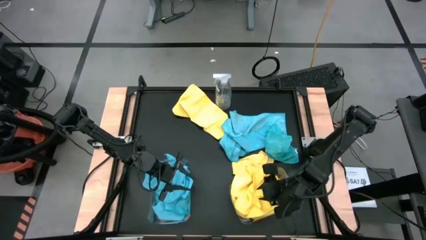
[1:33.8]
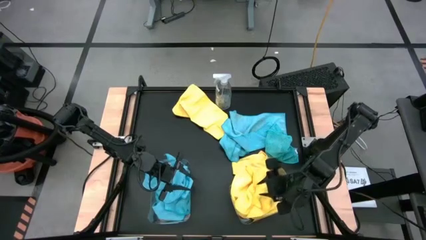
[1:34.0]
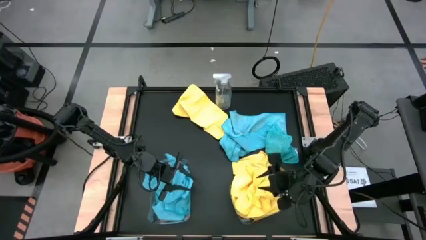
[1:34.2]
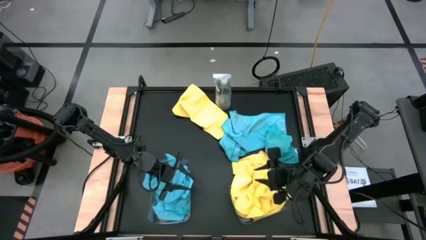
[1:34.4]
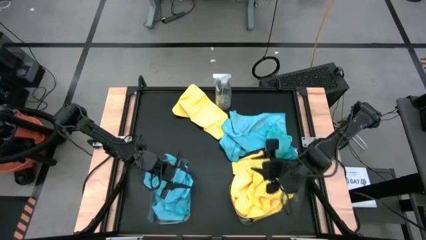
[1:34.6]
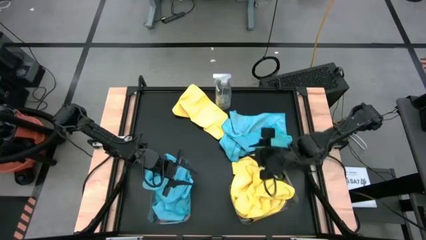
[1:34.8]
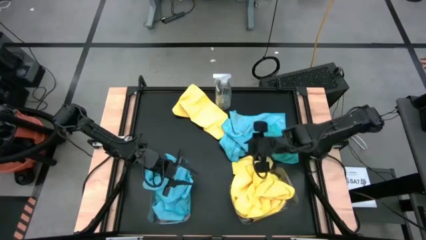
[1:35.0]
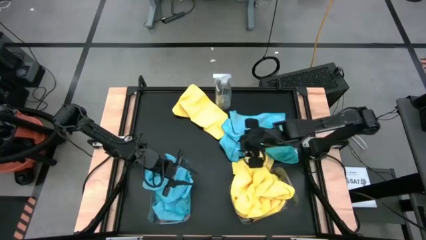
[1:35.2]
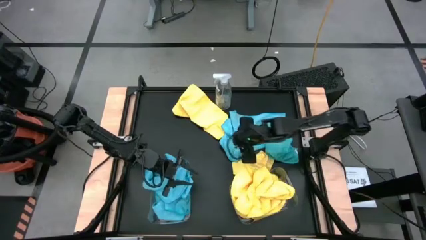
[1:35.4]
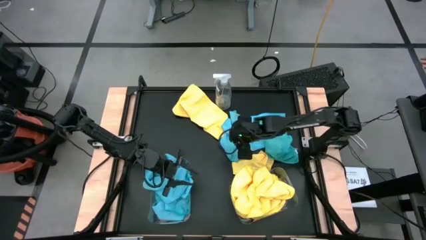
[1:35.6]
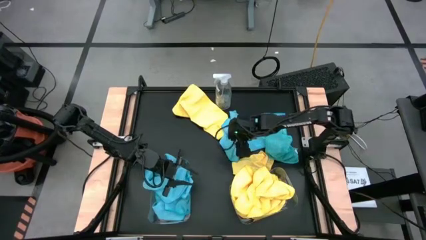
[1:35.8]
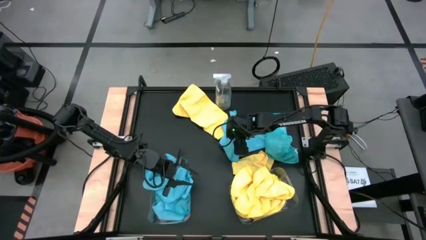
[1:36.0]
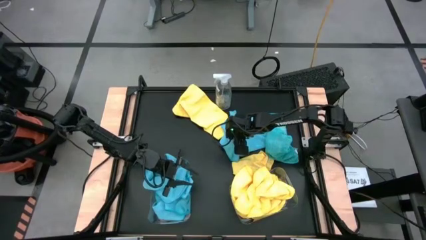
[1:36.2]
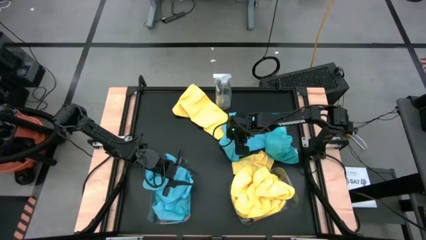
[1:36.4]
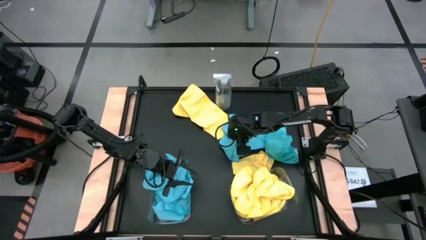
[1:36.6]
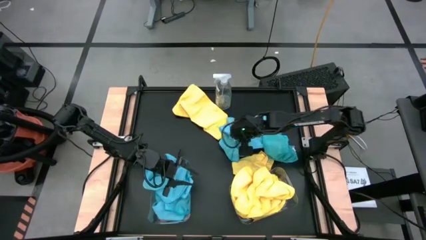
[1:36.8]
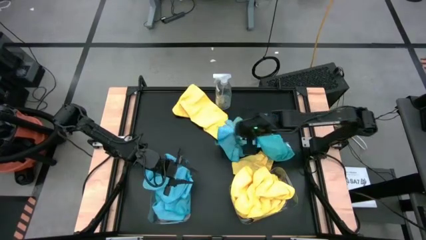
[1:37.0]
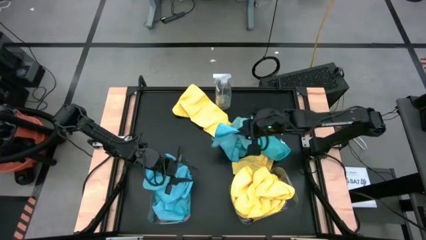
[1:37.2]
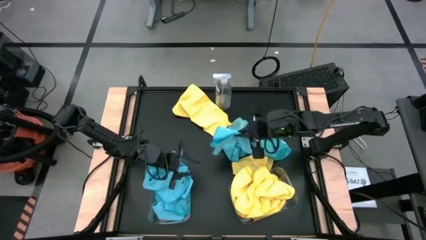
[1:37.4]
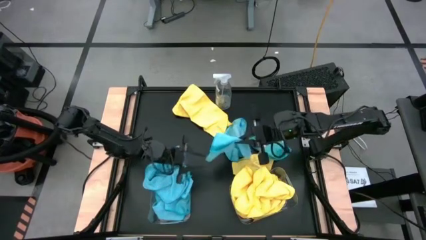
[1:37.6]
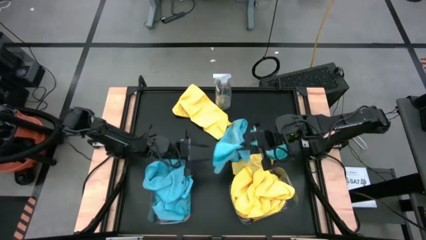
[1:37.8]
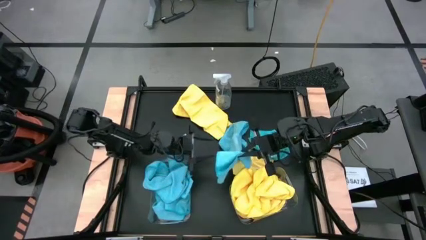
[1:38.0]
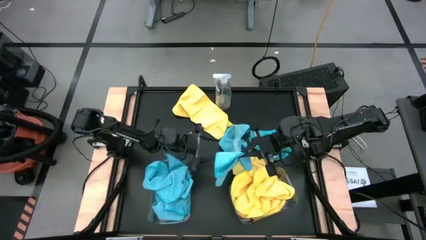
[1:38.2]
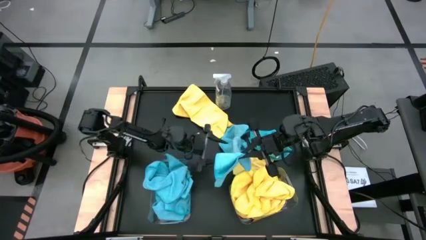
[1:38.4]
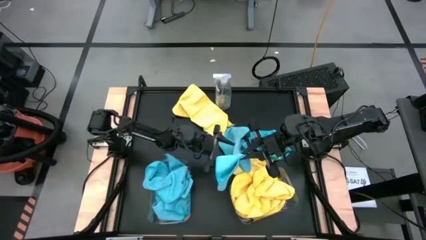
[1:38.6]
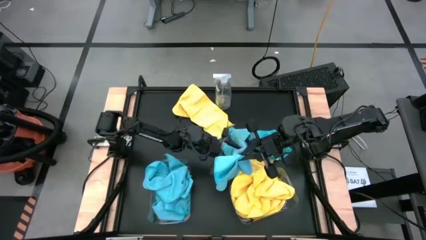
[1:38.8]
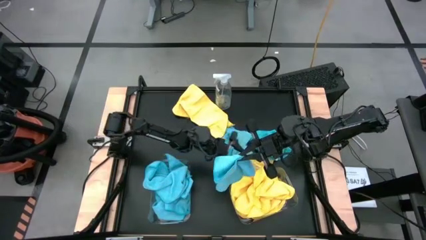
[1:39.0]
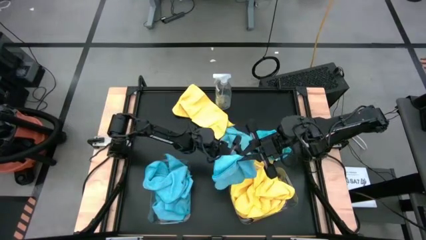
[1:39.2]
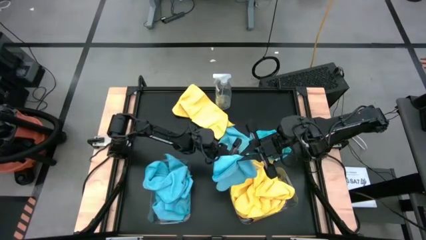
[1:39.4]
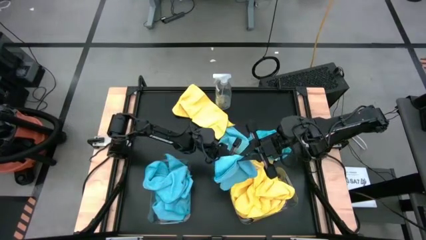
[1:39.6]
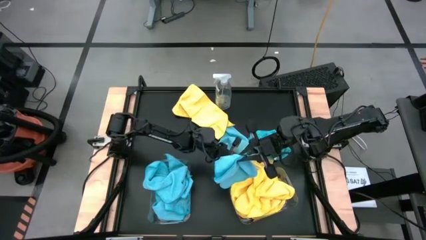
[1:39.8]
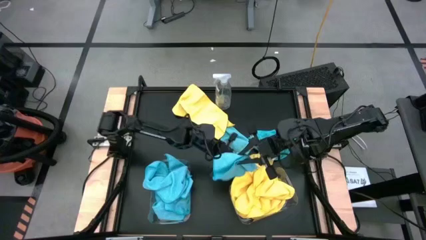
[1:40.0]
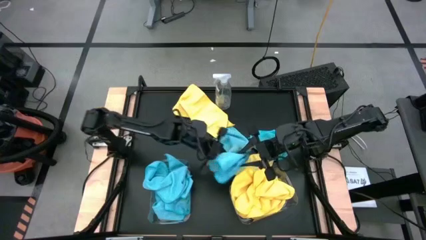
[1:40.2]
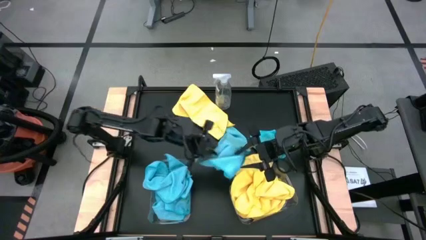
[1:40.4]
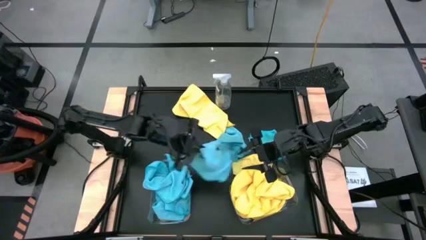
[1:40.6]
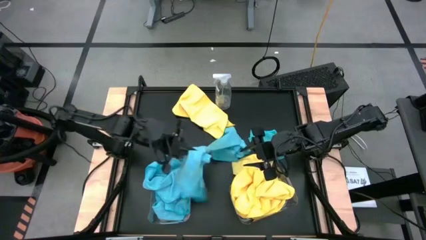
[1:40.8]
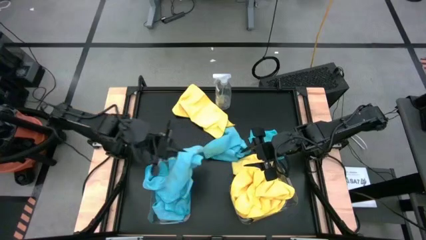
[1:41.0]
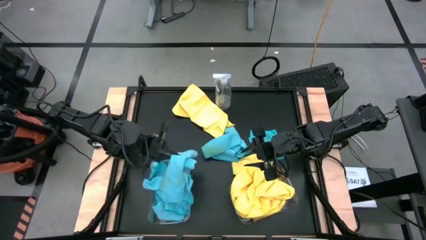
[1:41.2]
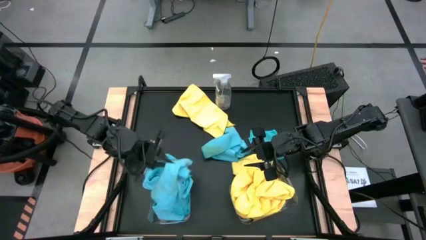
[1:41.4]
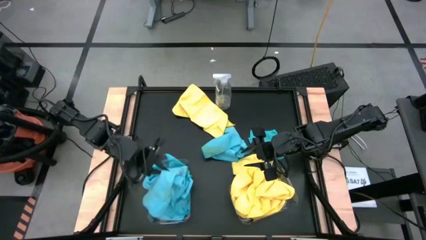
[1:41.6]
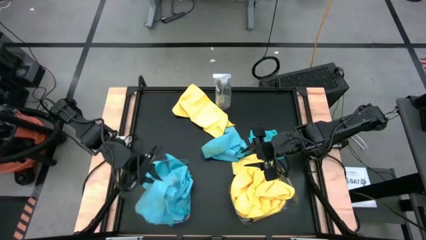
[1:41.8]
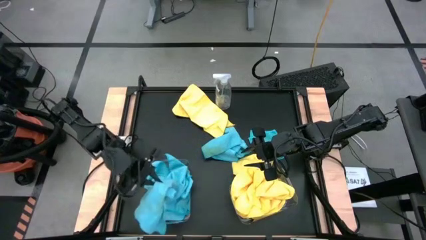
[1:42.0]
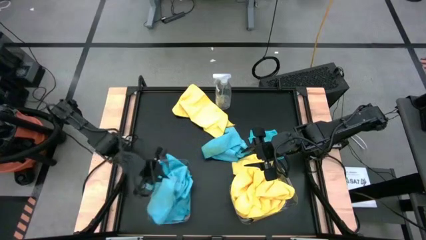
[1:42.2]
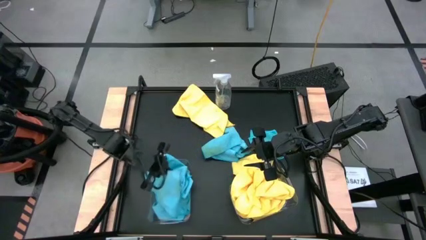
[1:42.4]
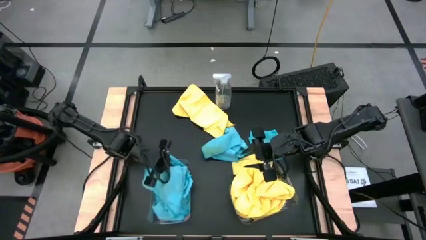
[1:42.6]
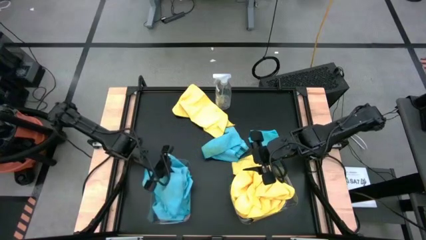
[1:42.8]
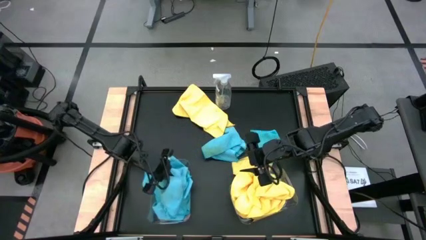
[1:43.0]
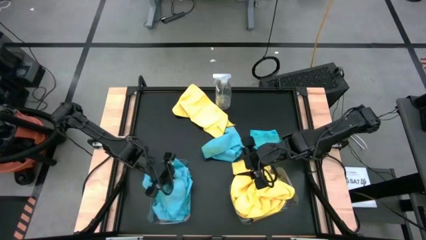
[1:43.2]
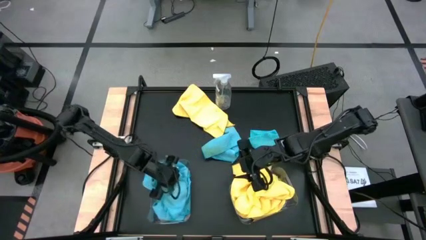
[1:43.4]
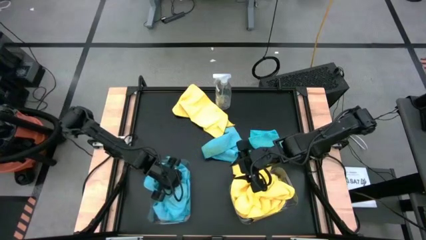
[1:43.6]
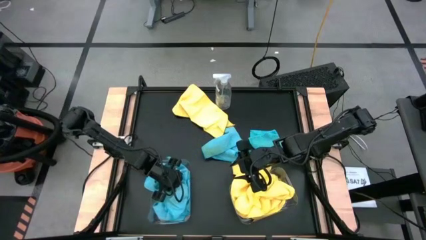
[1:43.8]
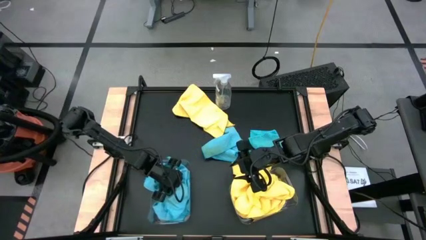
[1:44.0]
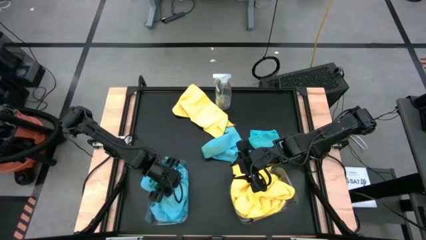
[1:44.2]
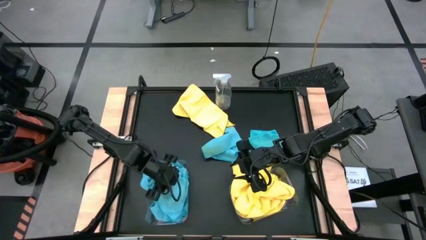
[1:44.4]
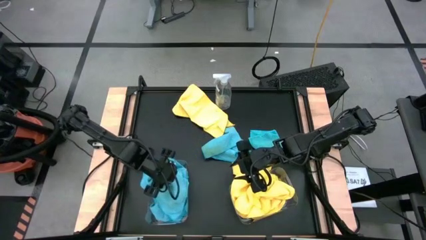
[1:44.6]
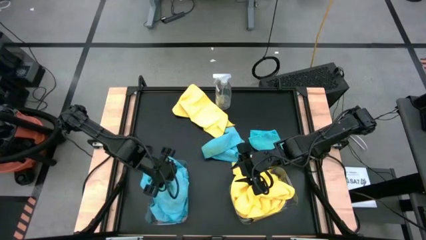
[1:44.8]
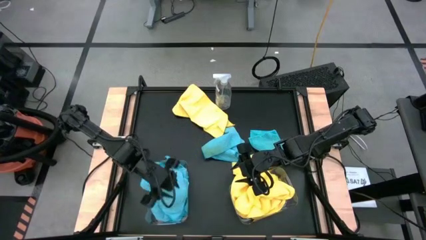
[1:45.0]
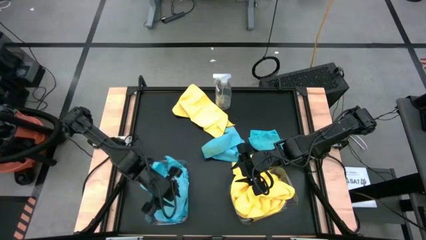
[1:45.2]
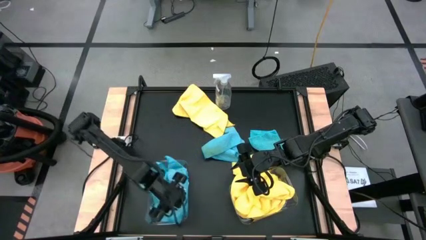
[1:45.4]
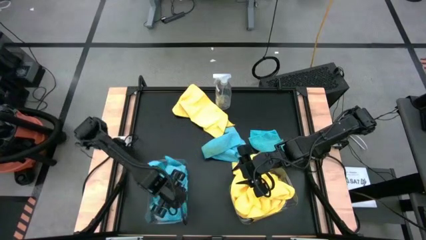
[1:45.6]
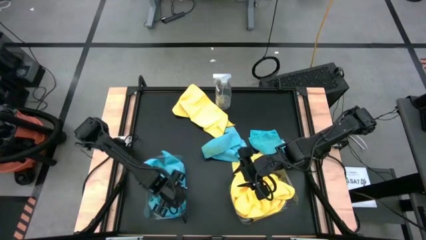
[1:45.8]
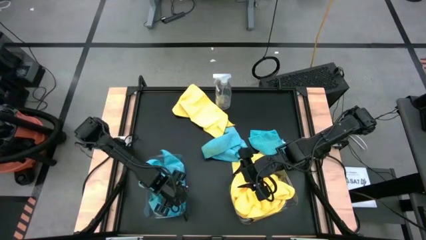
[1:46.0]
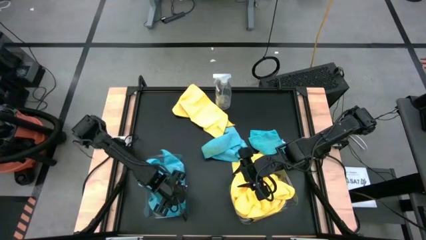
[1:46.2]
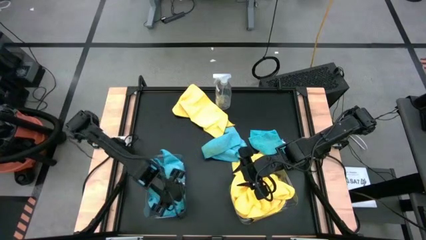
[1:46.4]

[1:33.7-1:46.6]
Task: Sort microfiber towel by color & place in baskets
Put the blue microfiber towel into the left transparent bin

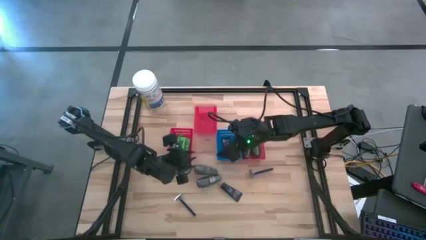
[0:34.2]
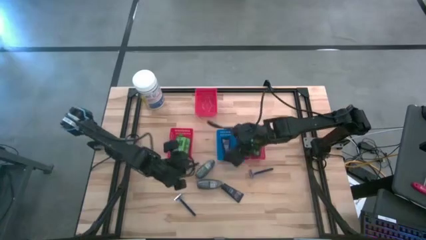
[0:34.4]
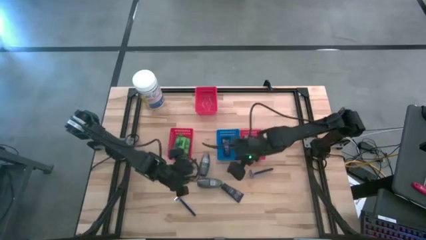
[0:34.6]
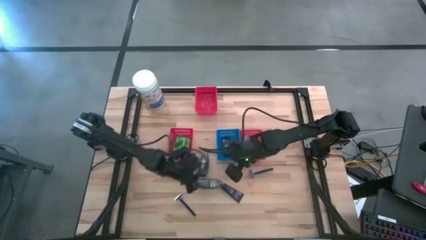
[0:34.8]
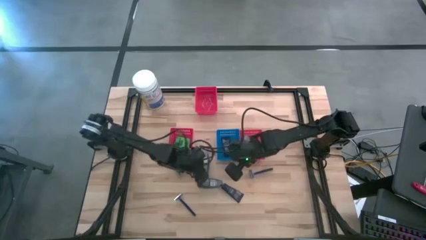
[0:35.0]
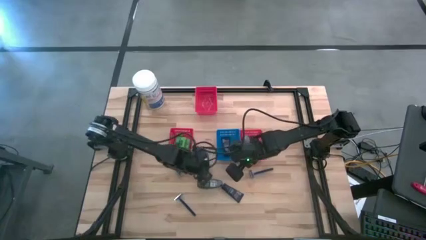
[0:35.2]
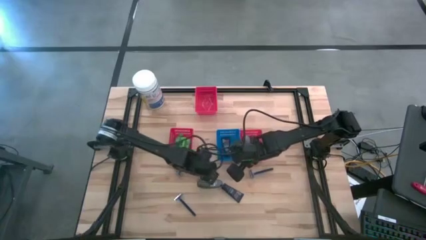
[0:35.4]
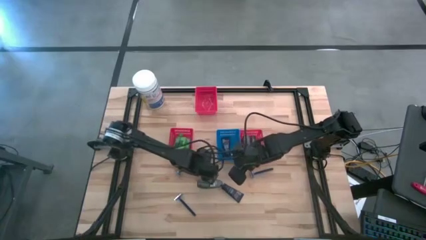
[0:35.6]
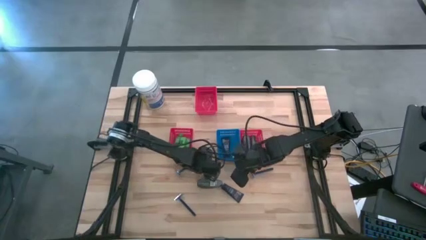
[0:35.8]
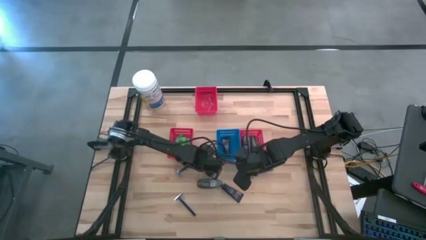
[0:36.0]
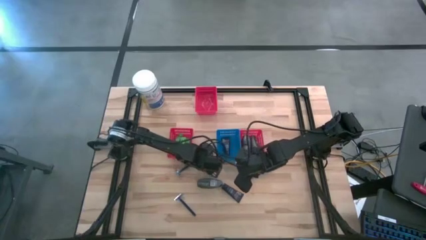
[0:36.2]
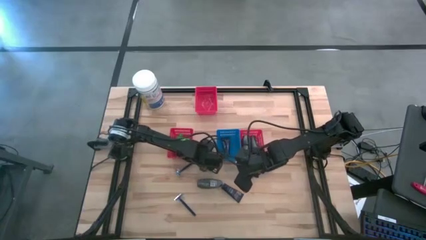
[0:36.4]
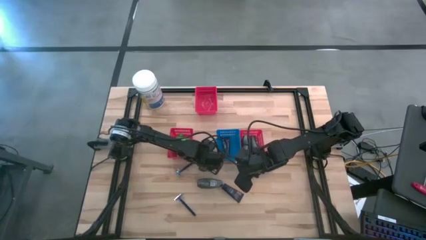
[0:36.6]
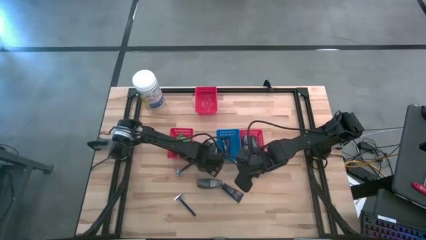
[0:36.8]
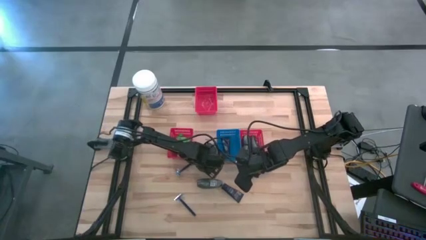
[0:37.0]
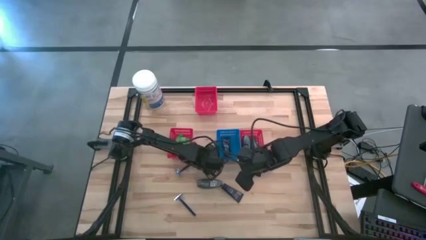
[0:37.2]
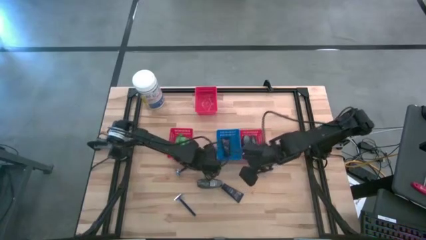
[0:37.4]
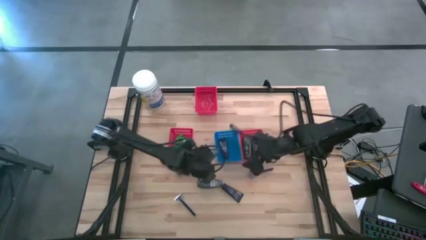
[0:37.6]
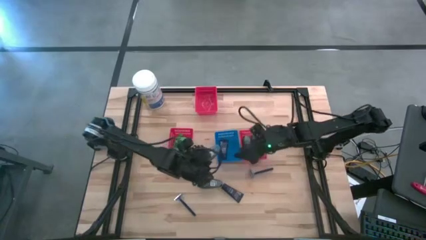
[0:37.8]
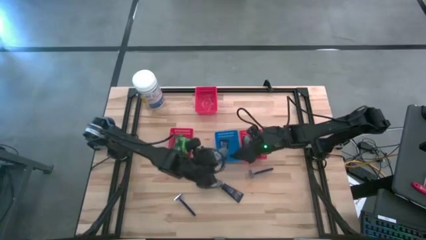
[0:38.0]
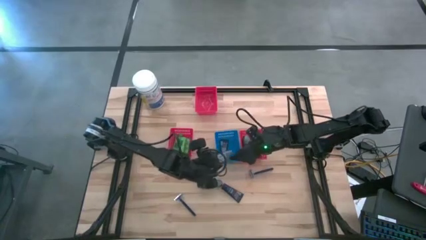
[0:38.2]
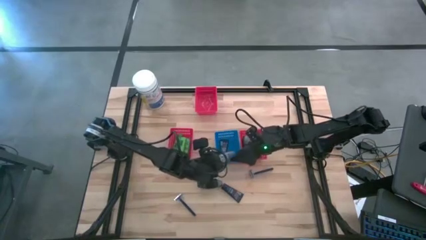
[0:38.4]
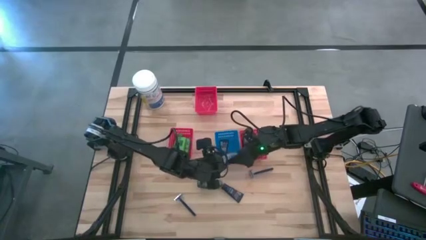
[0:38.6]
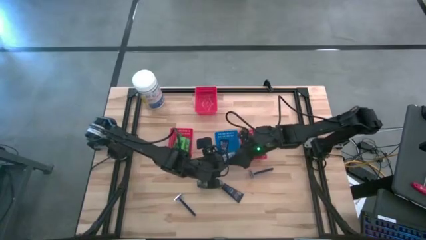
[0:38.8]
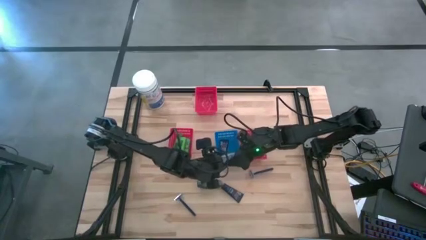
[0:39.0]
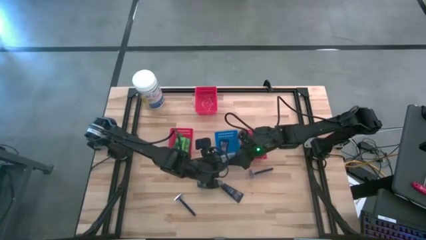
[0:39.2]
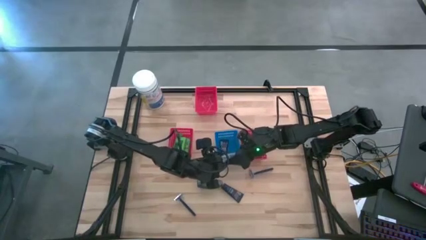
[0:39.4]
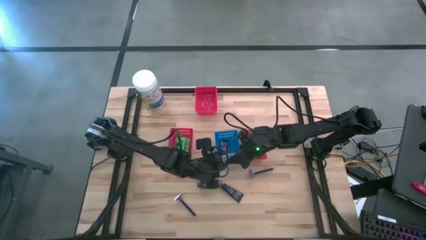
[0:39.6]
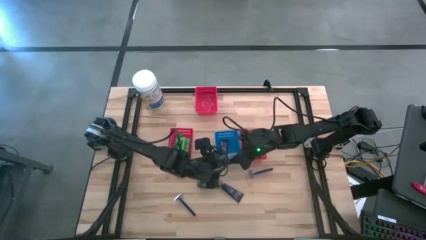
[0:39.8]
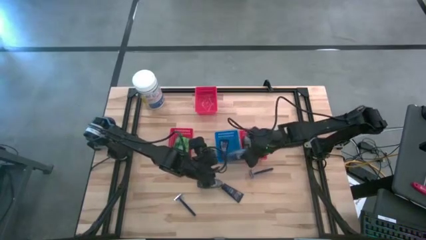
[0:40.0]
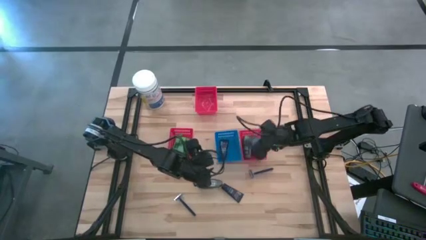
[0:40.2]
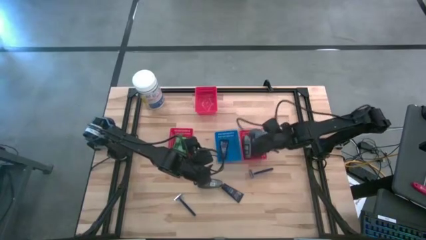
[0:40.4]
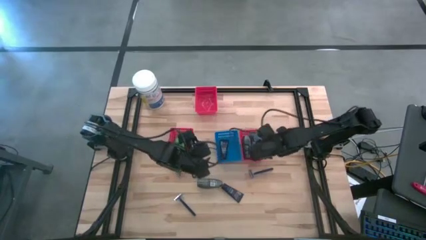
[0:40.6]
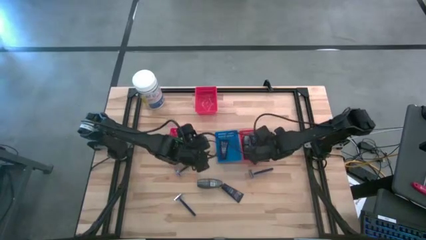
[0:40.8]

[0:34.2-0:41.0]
Task: Pick & Place Travel size toiletries
Put the black deodorant into the right red bin
